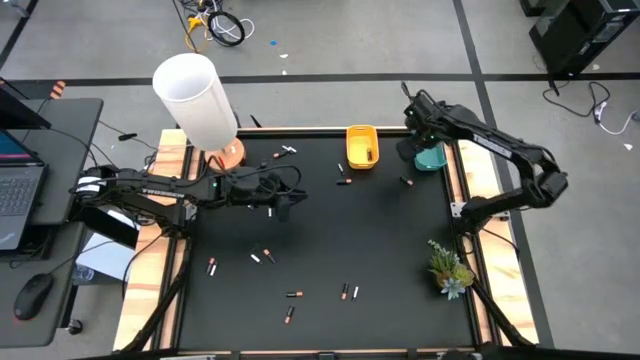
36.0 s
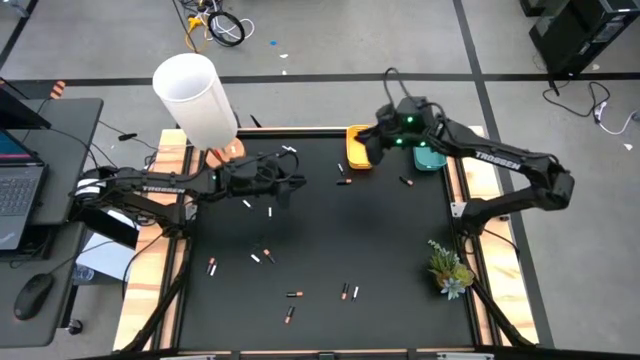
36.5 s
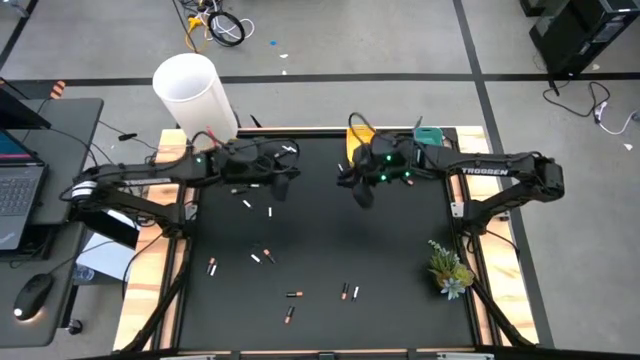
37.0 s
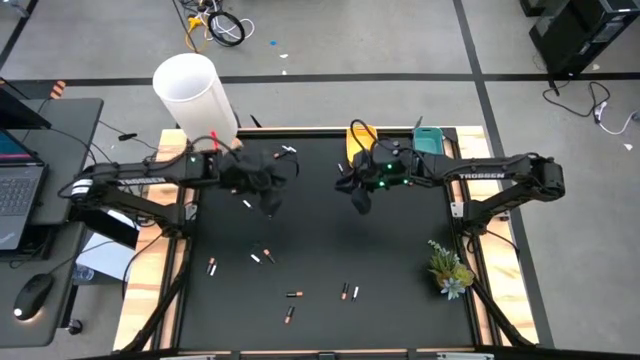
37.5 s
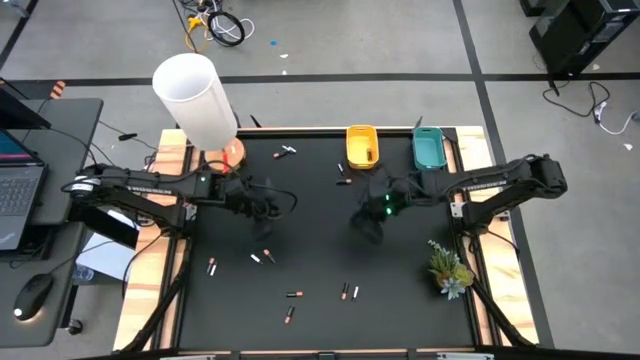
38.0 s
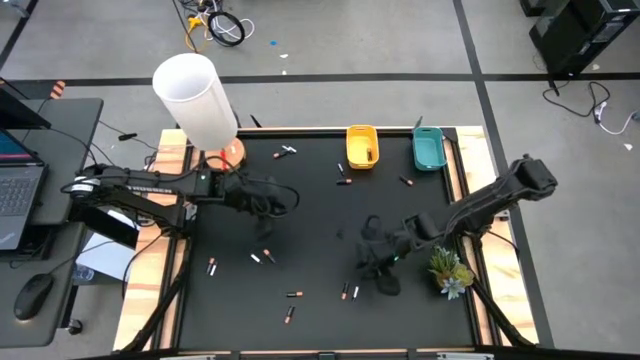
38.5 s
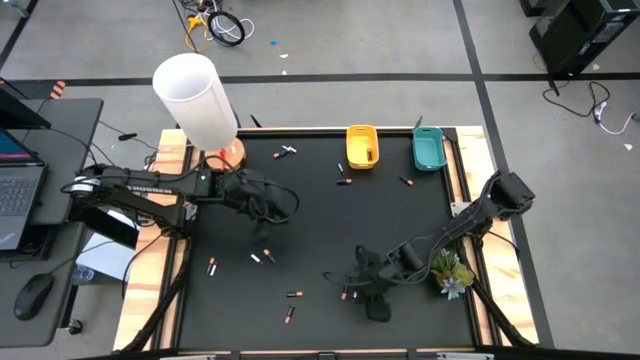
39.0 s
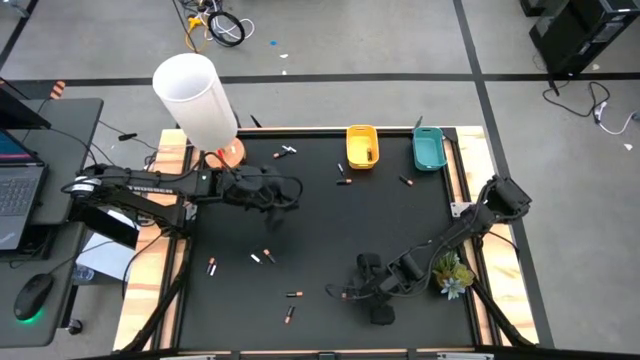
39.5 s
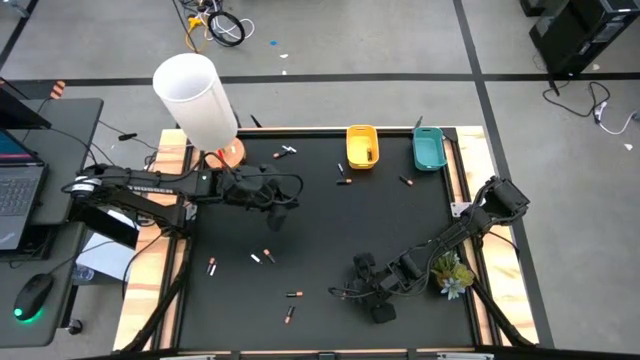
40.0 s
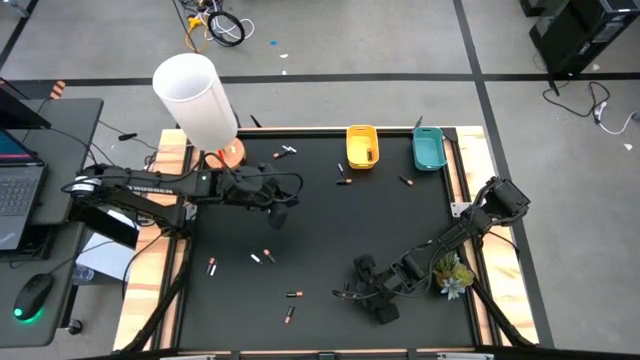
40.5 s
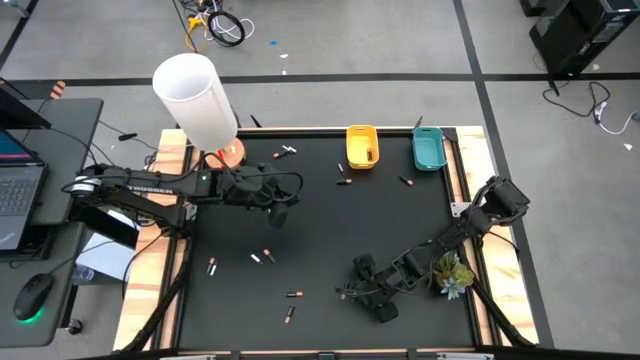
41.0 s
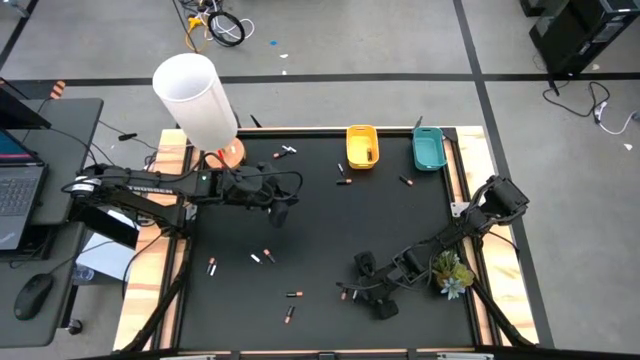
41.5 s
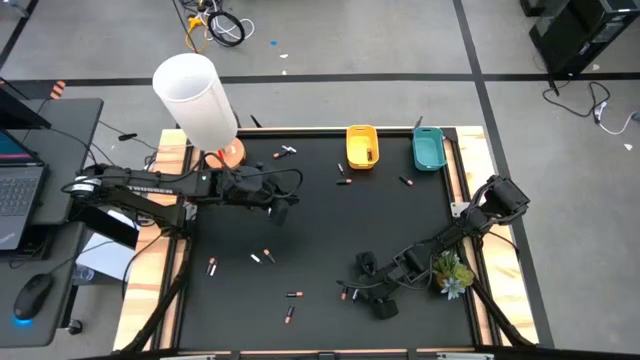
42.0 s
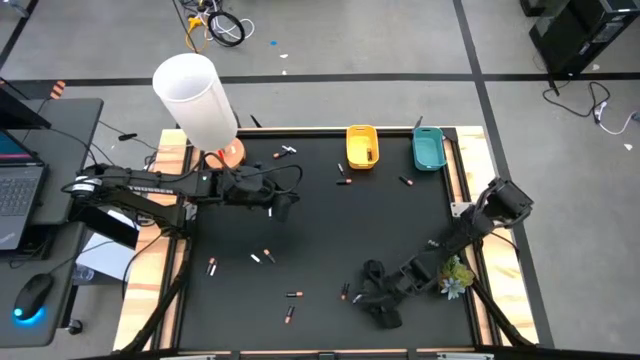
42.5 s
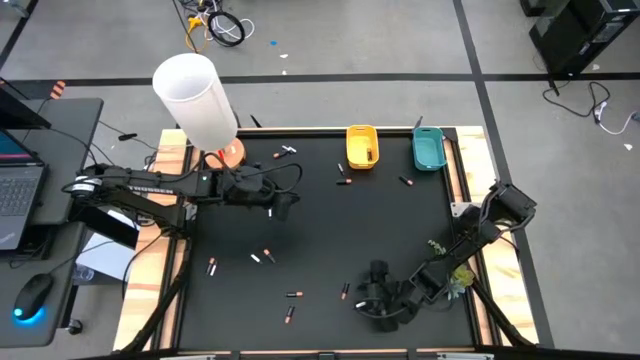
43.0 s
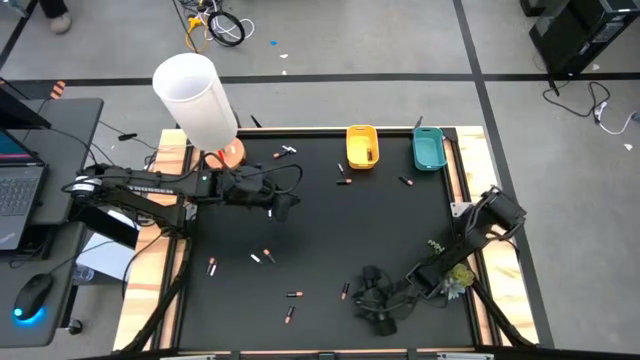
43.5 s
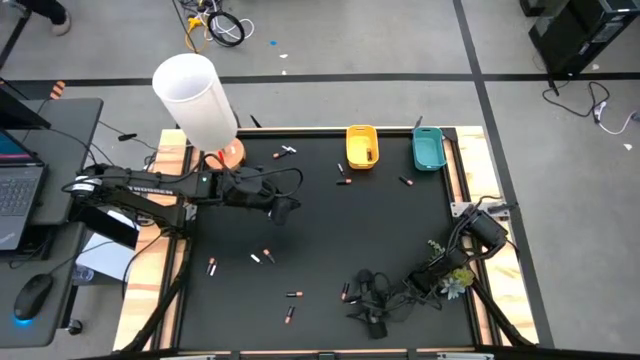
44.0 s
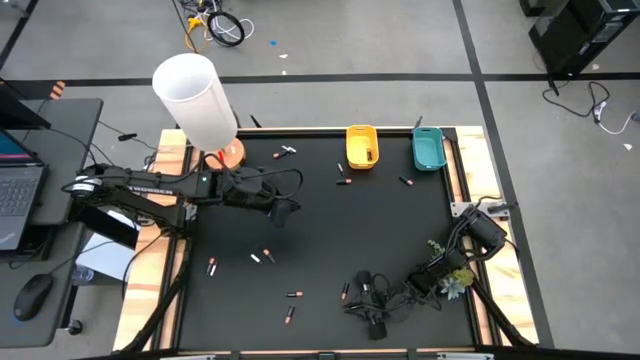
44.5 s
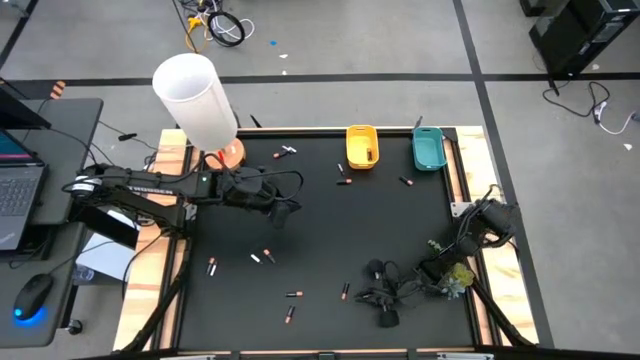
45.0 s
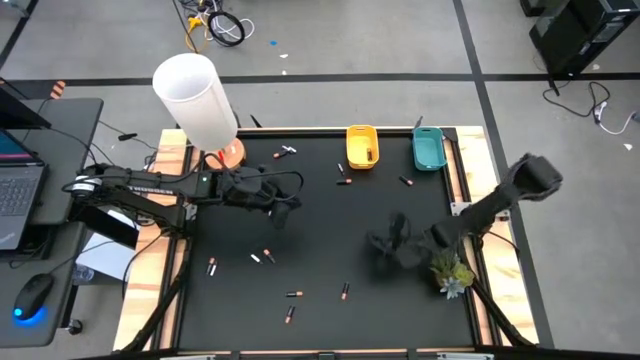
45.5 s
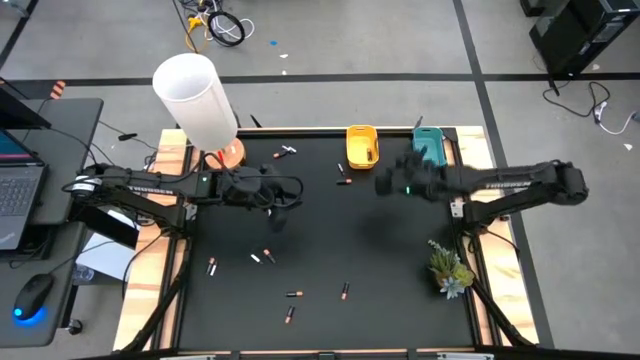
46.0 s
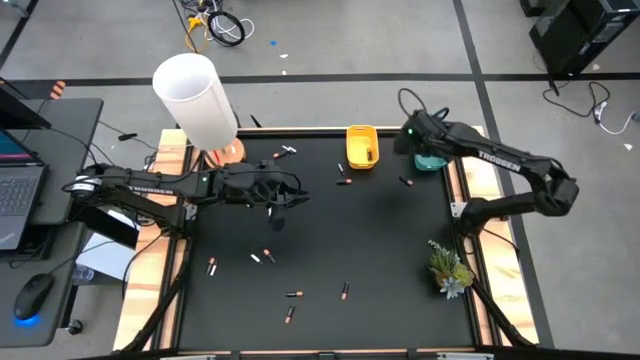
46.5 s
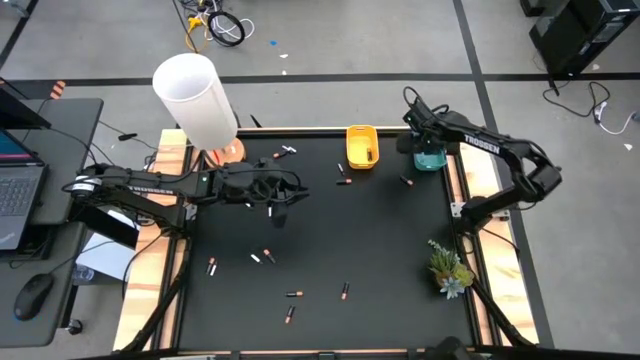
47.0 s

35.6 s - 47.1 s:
Task: Sort batteries
Put the silver battery into the blue bin

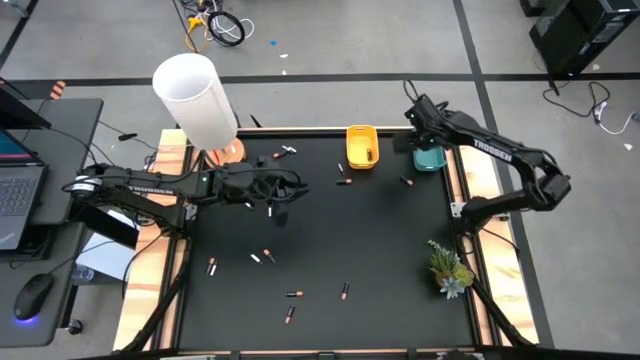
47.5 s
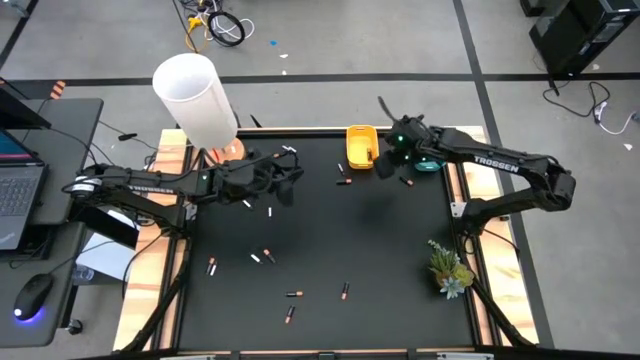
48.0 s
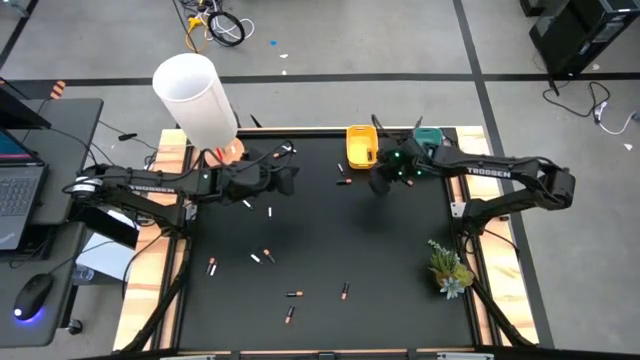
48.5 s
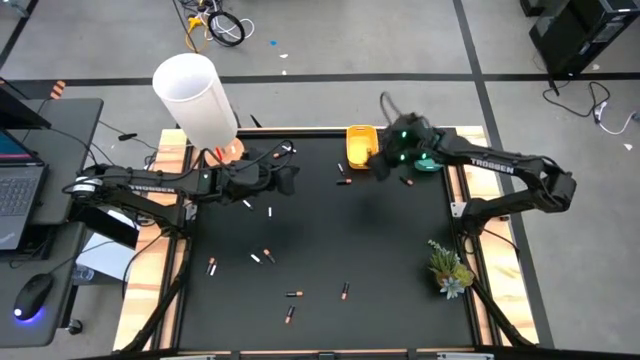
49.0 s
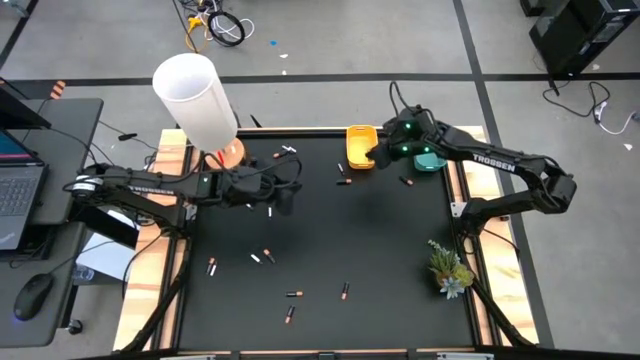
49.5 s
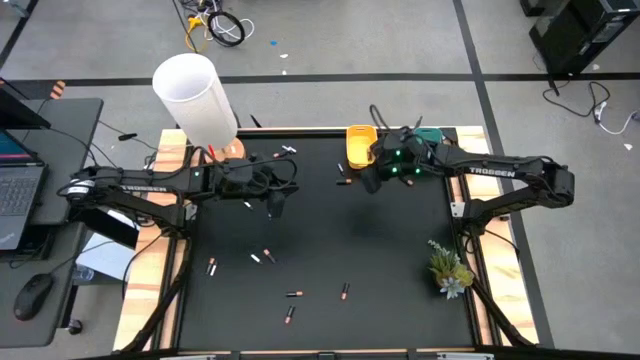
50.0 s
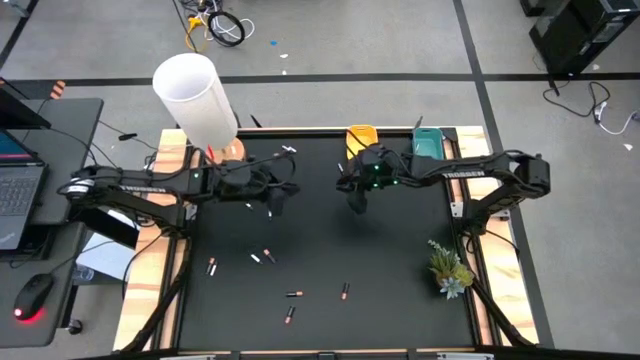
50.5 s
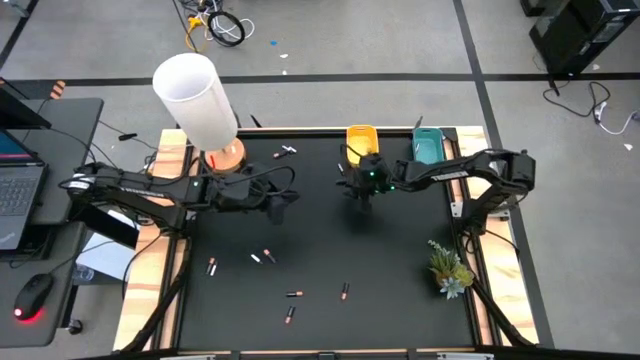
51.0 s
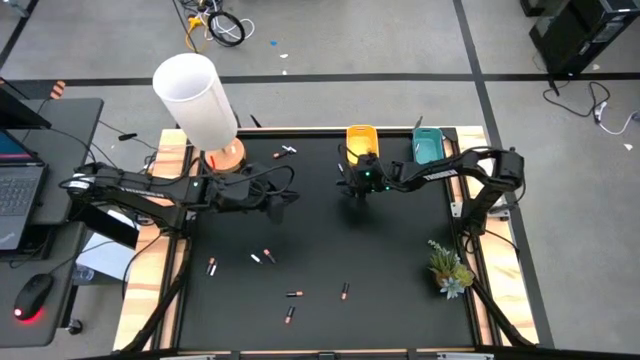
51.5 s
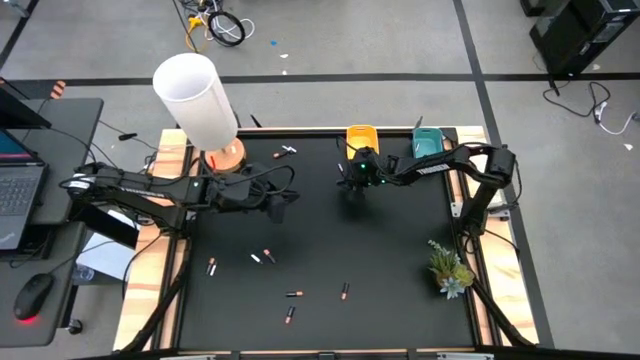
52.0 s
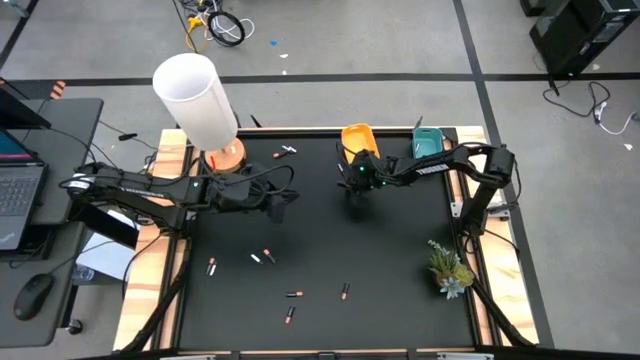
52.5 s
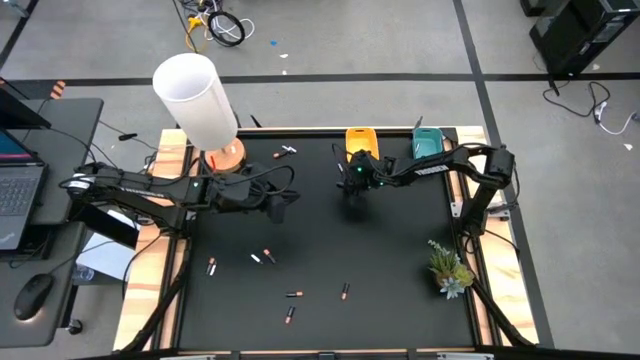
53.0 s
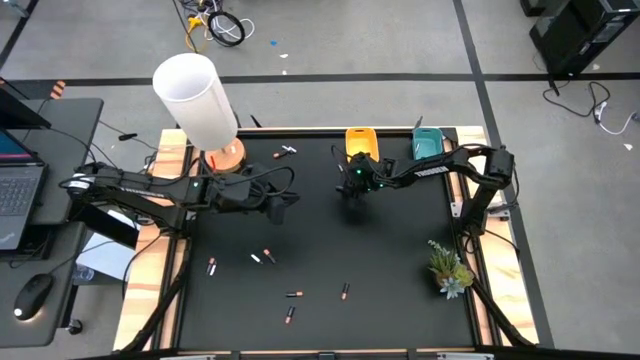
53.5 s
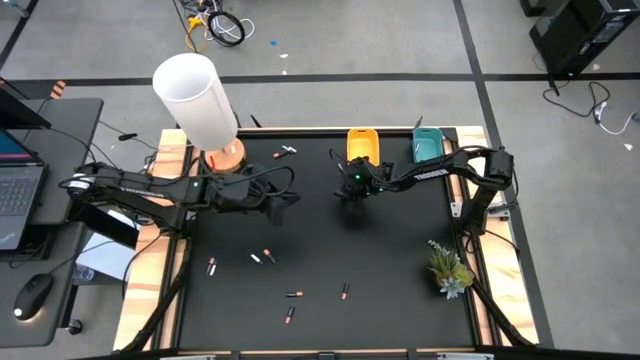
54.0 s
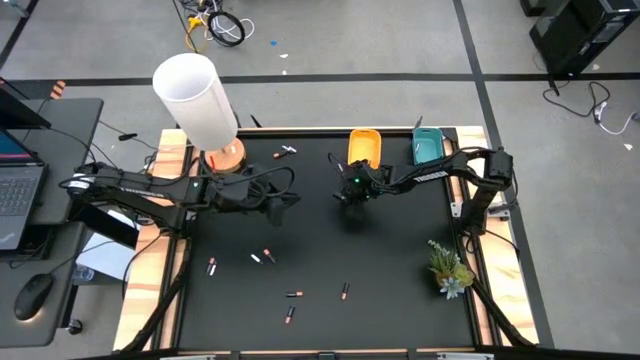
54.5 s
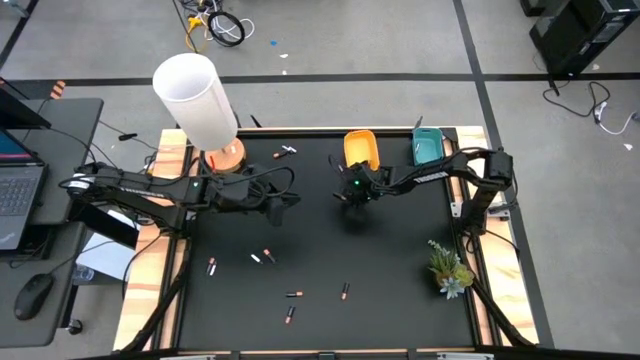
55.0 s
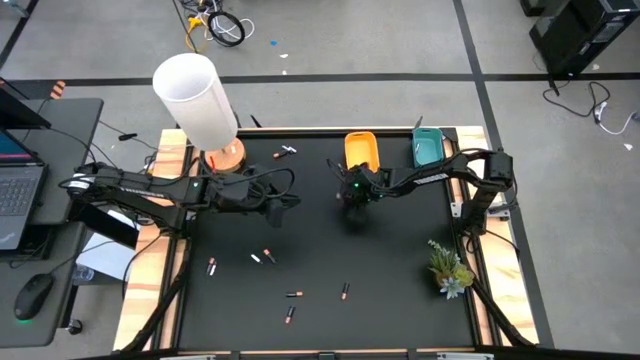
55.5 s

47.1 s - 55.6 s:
Put the black battery into the yellow bin
